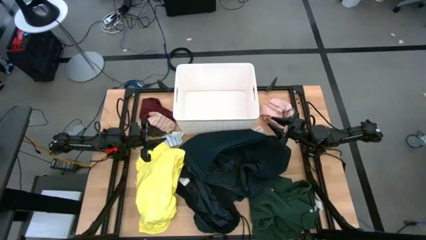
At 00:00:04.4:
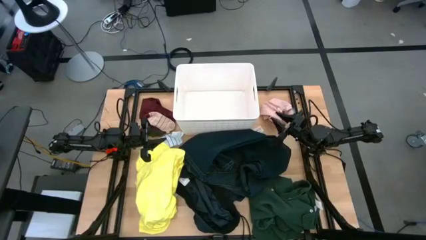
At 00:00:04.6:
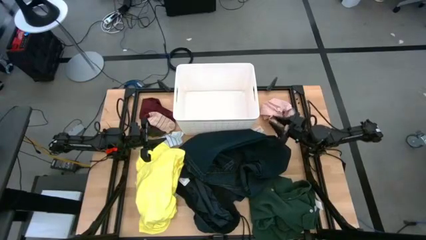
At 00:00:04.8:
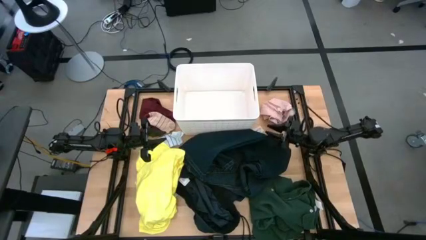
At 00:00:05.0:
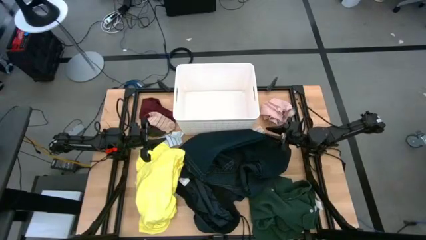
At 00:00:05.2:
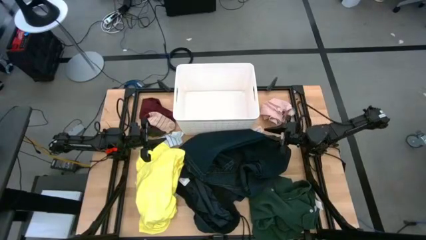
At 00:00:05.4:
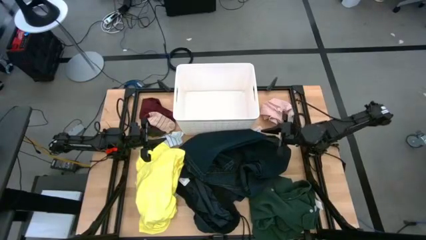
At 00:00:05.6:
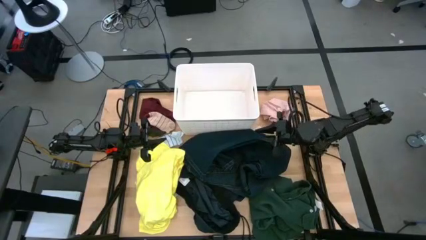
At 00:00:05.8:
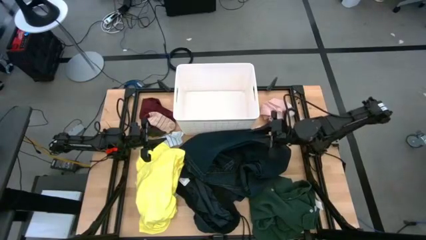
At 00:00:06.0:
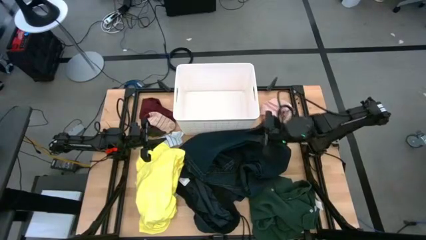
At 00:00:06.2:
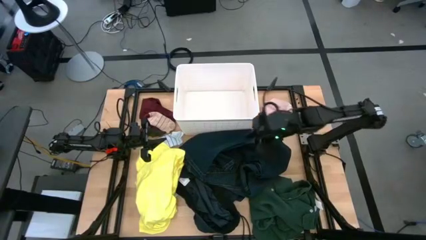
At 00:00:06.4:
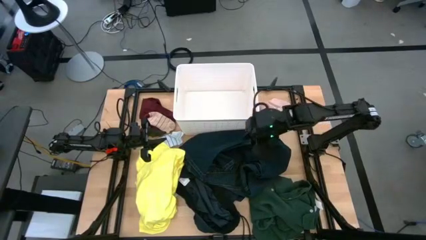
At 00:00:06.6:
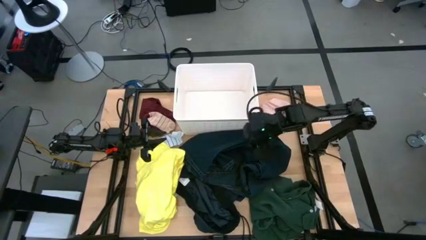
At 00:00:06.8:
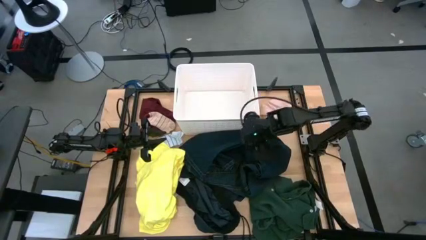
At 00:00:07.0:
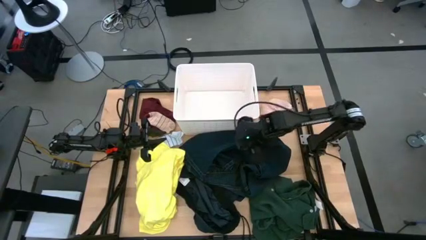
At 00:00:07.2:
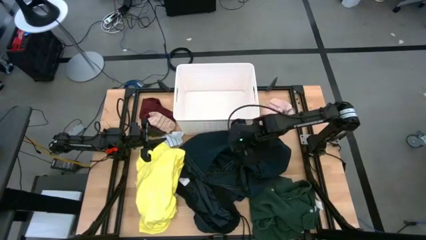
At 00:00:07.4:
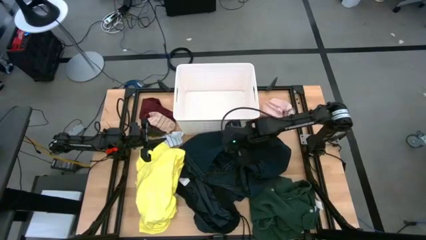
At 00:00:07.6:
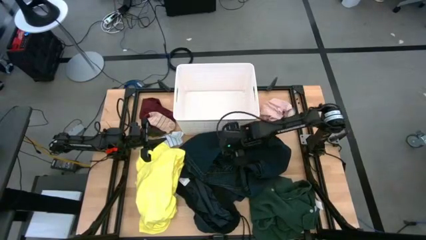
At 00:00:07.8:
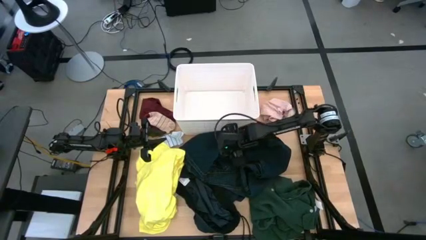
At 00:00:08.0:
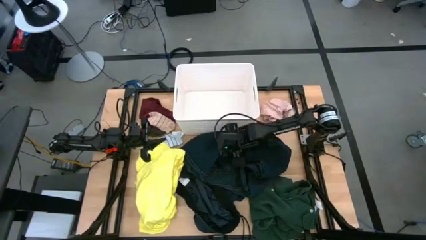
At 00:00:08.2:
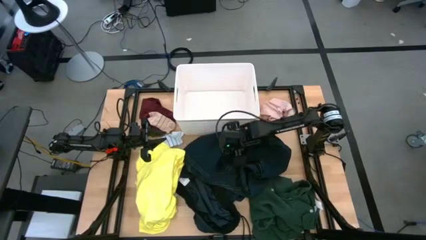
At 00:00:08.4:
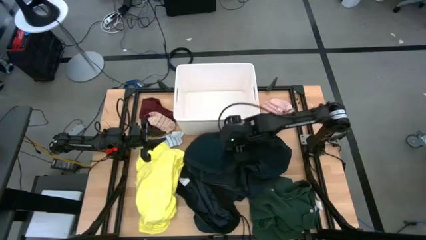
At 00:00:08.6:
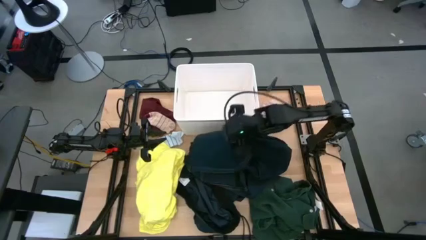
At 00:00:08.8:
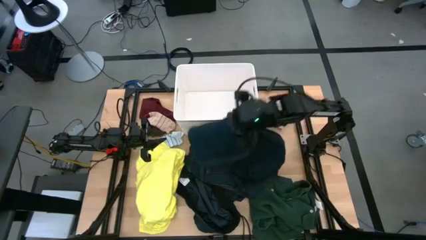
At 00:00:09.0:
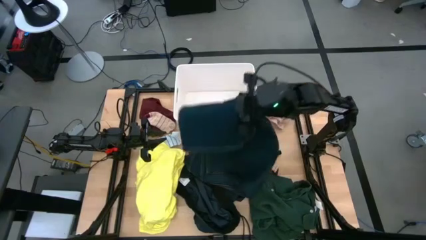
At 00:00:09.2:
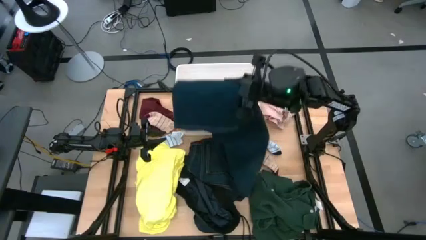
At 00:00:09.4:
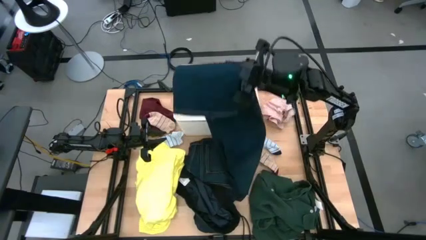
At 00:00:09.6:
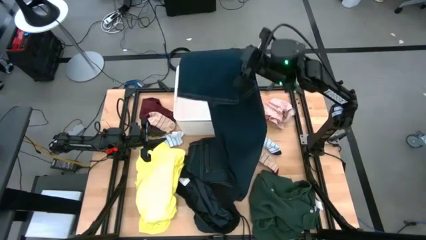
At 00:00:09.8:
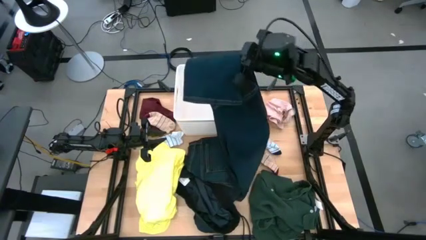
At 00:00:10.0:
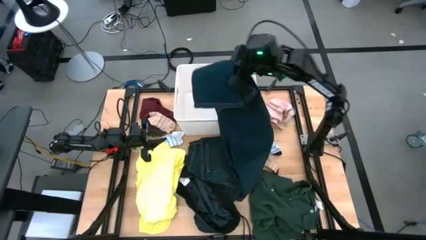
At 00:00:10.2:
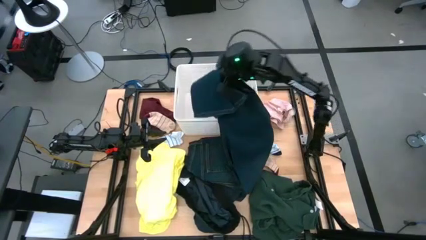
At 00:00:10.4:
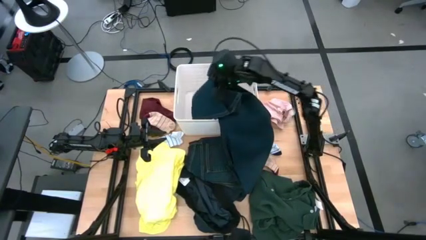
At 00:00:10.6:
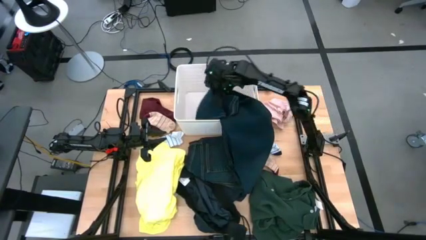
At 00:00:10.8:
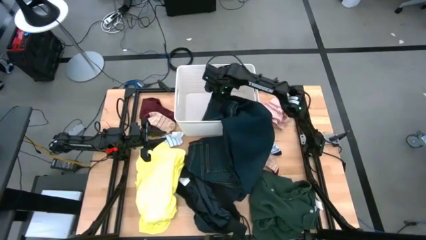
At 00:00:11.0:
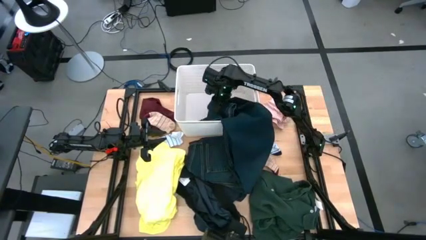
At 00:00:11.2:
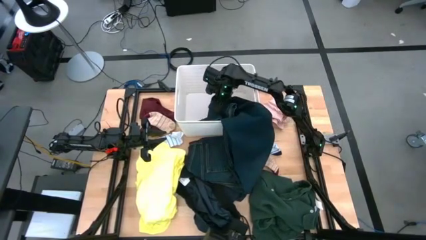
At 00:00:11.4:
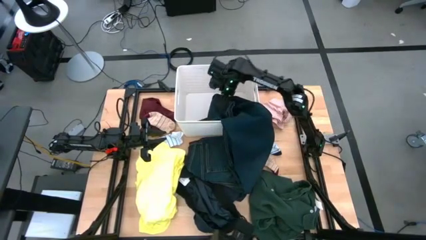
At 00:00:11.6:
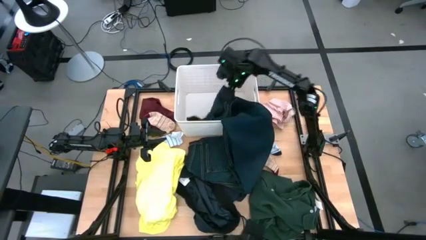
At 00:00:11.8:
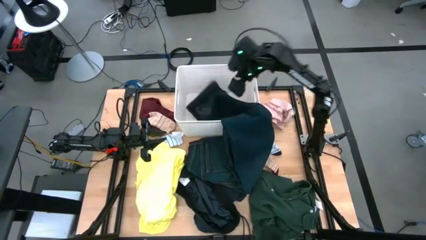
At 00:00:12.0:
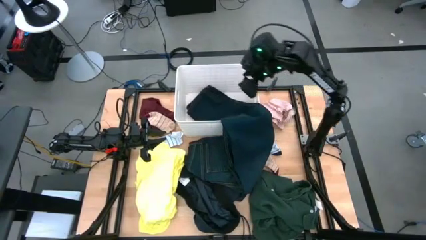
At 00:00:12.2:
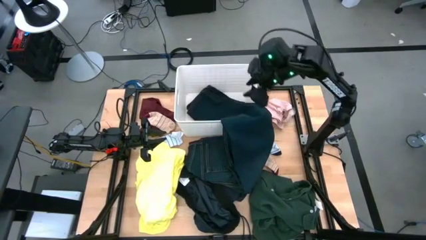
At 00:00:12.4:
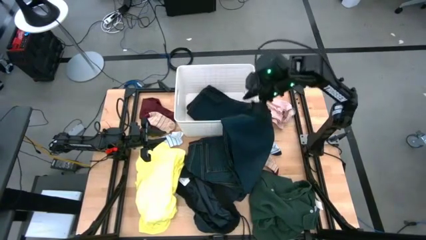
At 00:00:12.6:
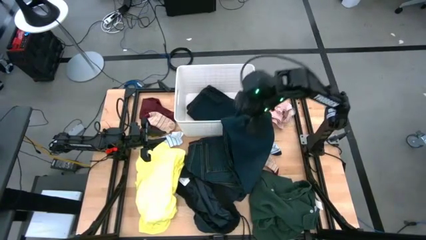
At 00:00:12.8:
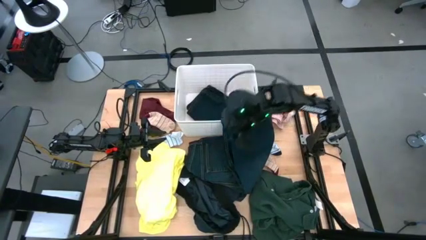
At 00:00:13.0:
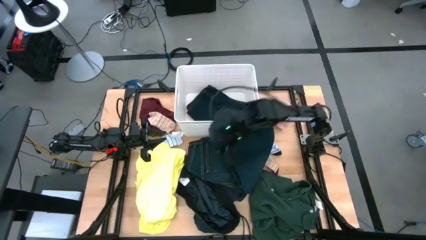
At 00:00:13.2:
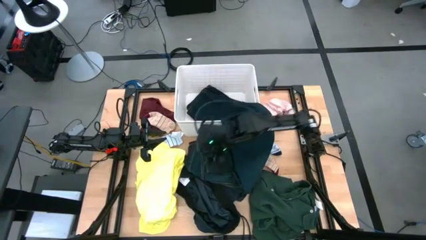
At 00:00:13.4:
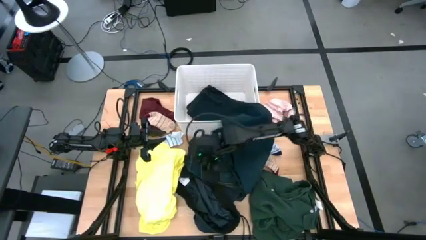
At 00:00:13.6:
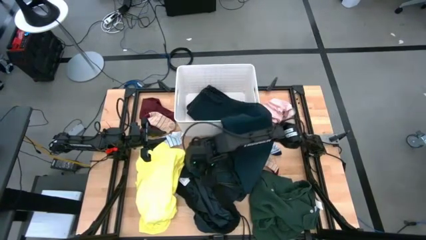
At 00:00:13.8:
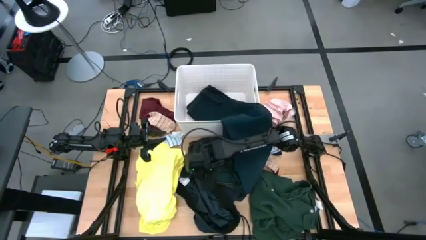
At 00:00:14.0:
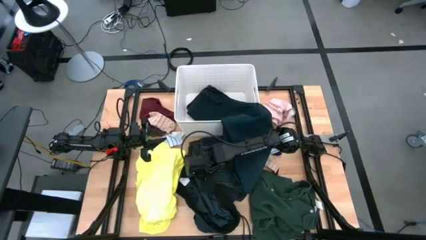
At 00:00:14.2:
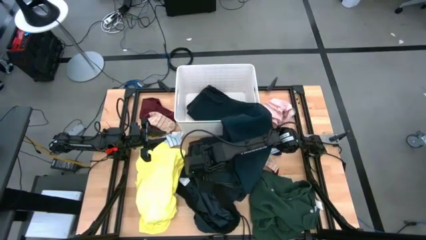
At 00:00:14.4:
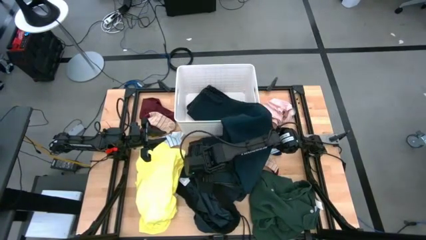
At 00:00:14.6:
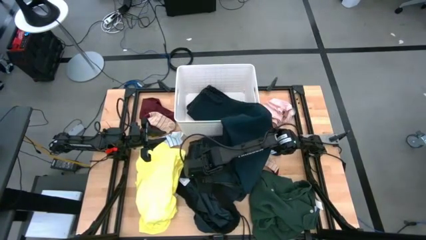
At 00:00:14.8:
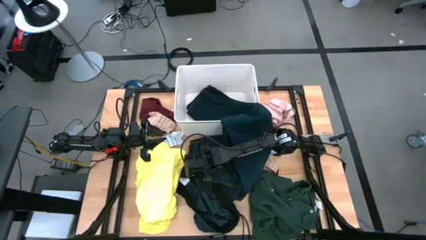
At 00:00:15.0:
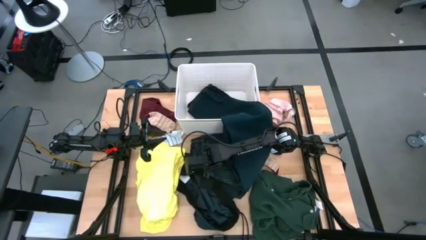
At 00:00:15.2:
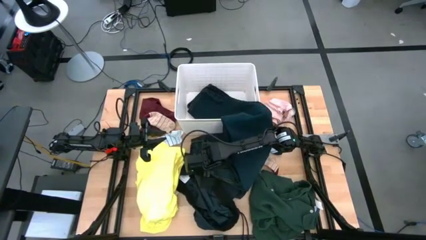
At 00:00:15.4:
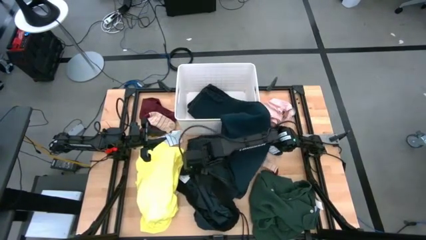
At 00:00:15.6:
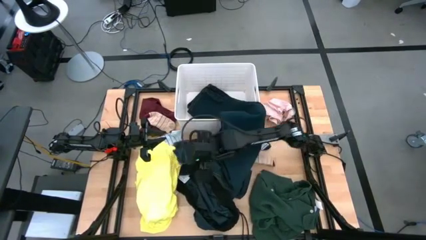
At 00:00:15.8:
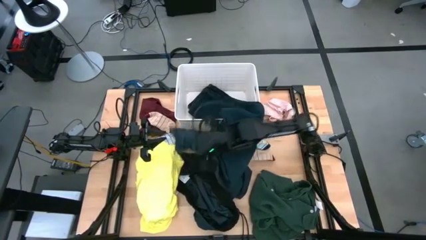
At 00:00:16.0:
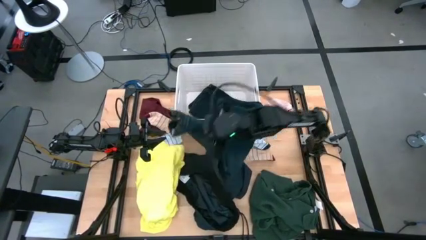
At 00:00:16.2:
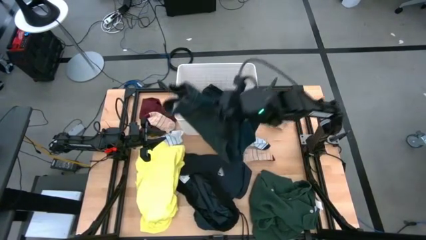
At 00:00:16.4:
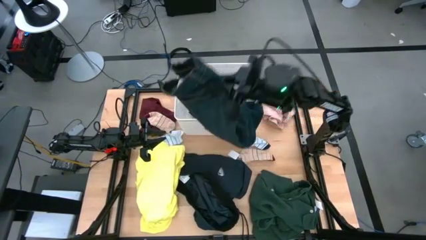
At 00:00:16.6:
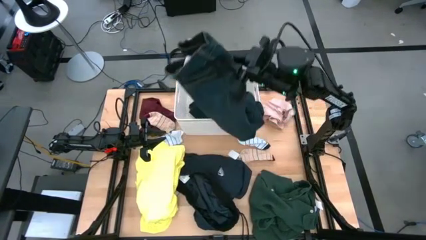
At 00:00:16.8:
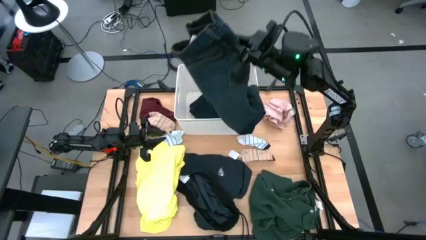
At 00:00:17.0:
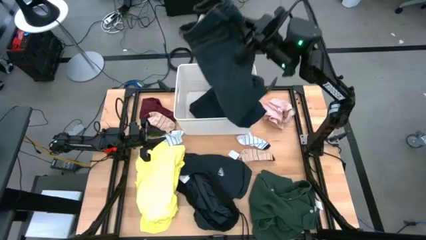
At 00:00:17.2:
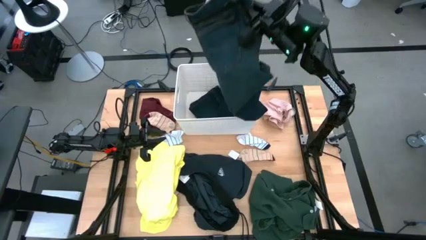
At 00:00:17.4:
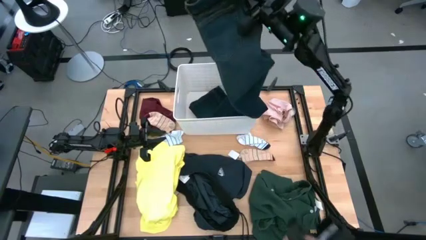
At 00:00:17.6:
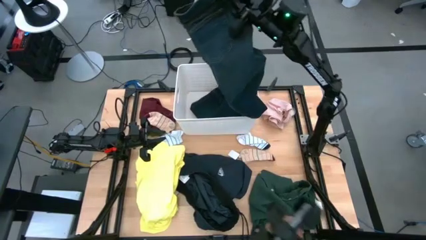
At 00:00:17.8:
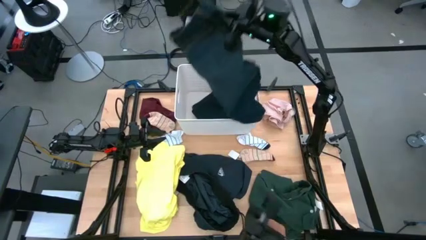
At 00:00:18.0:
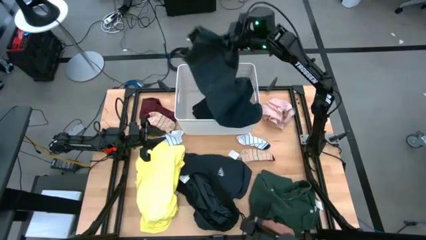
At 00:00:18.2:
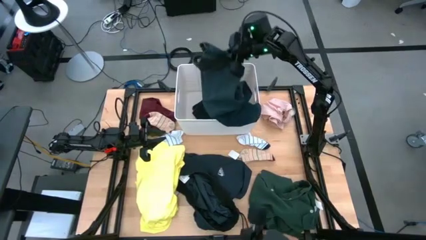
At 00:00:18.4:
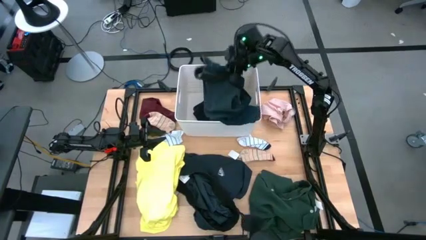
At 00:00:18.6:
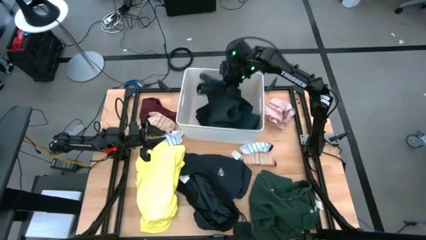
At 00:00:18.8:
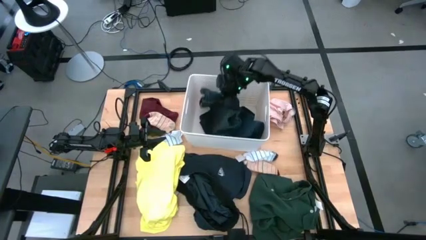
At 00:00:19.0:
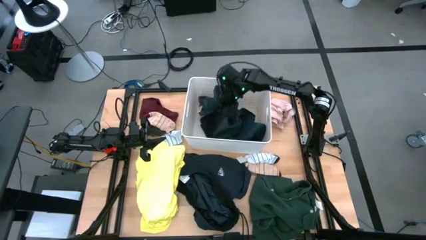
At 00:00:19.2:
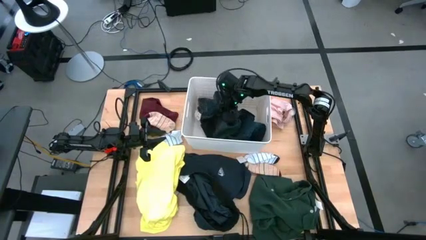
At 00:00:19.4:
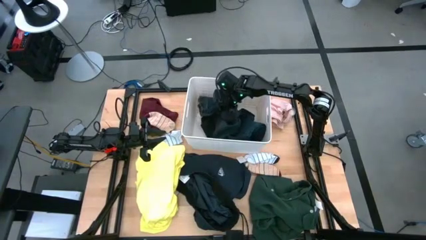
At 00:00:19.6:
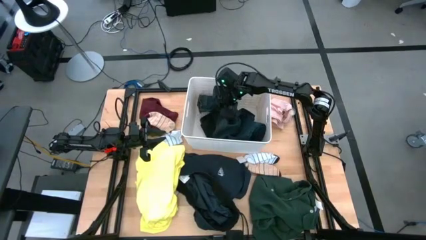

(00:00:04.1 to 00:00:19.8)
Task: Sort clothes
Put the dark blue pants into the white bin
